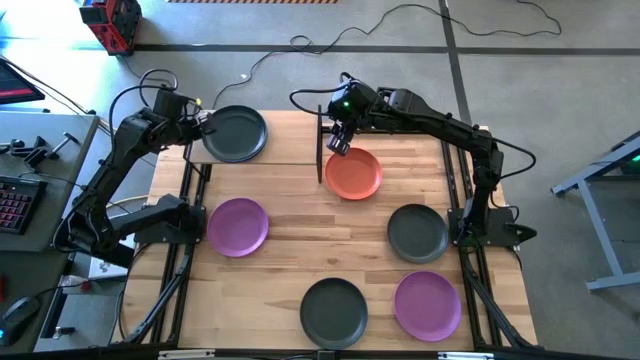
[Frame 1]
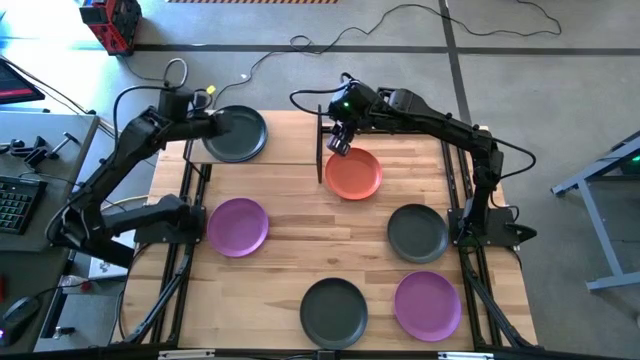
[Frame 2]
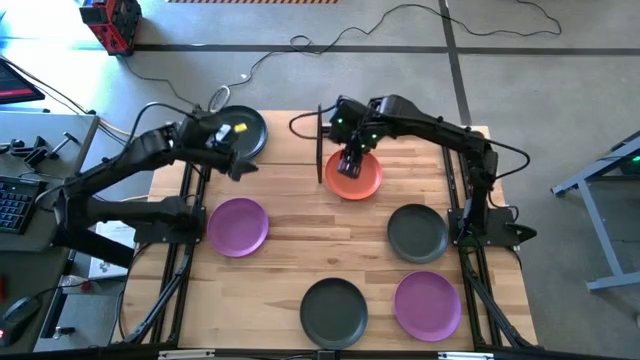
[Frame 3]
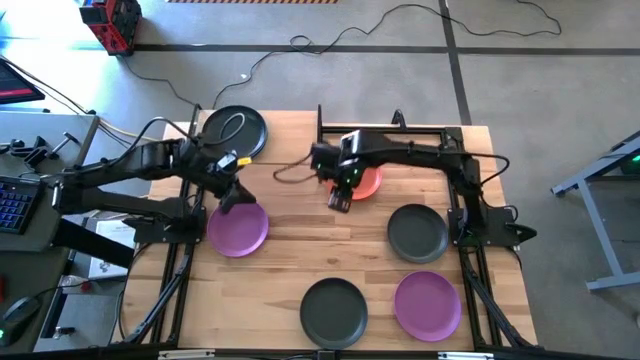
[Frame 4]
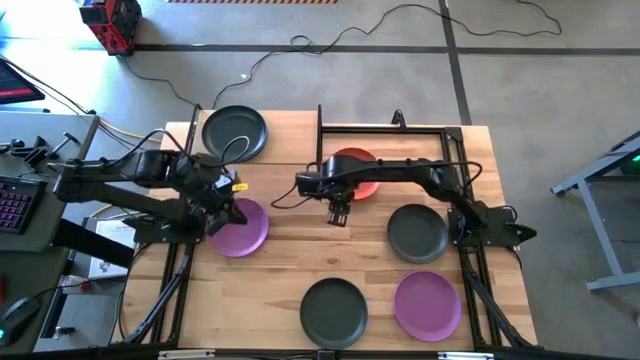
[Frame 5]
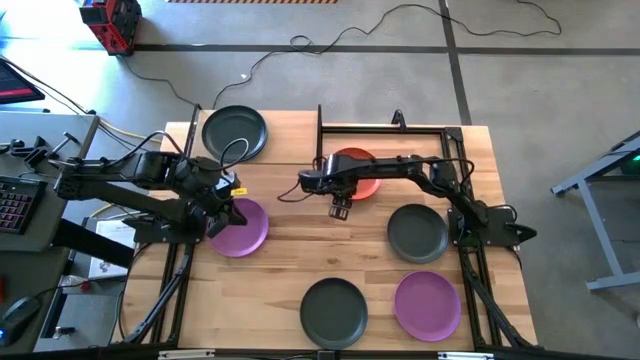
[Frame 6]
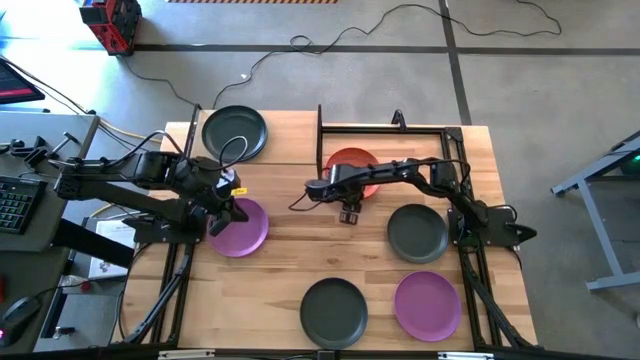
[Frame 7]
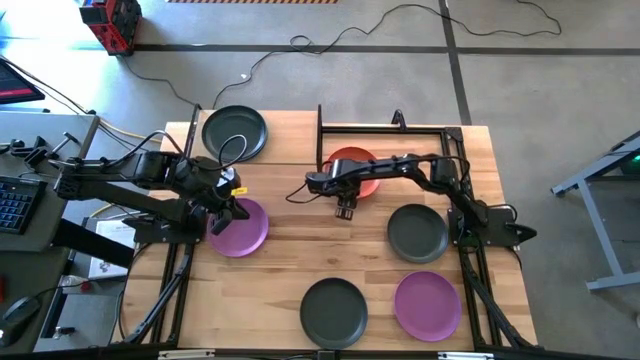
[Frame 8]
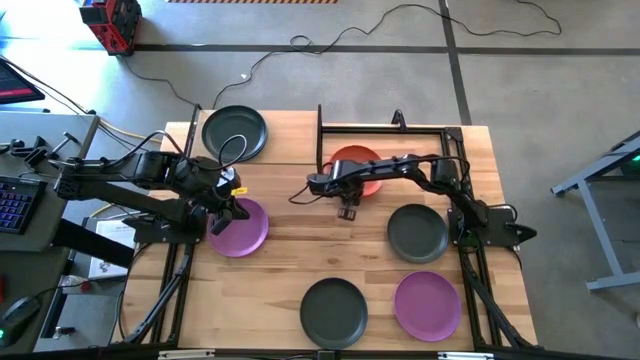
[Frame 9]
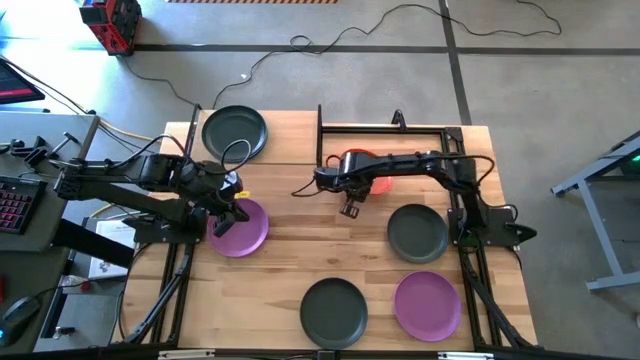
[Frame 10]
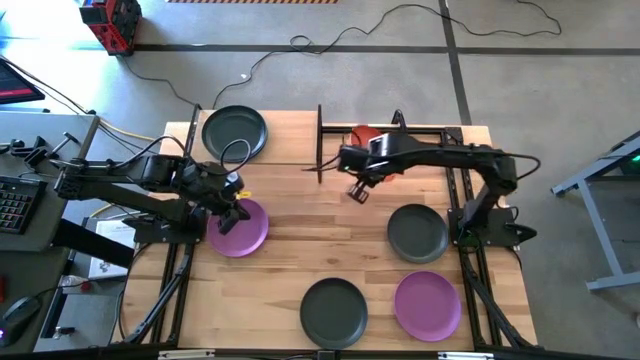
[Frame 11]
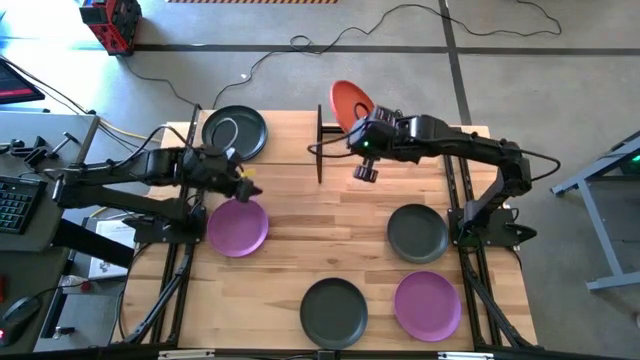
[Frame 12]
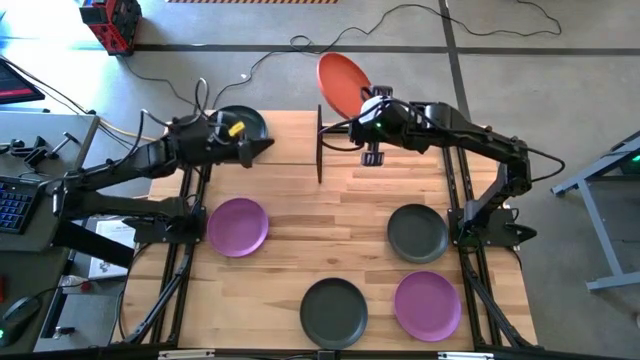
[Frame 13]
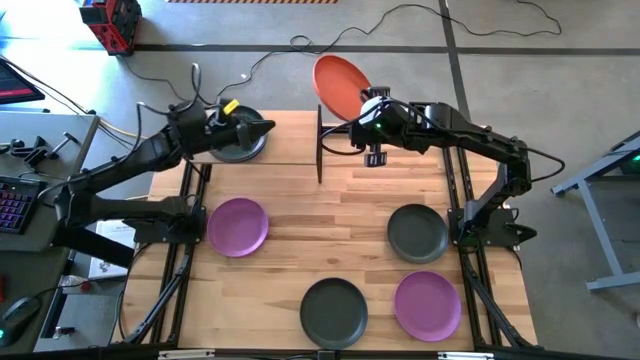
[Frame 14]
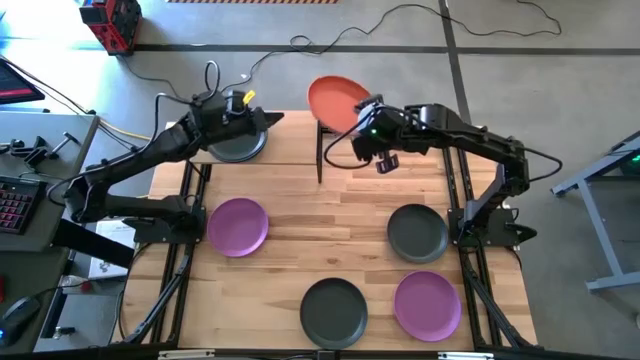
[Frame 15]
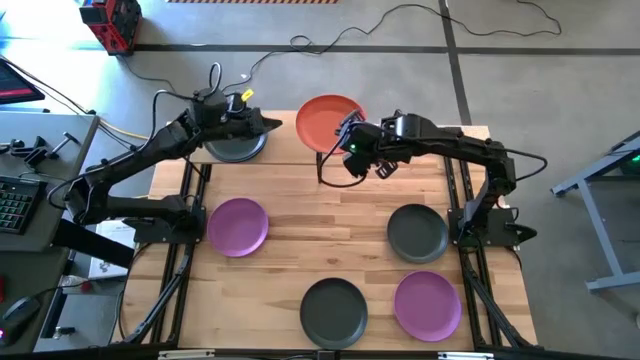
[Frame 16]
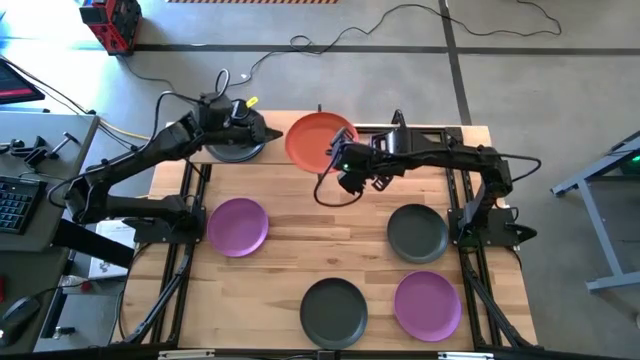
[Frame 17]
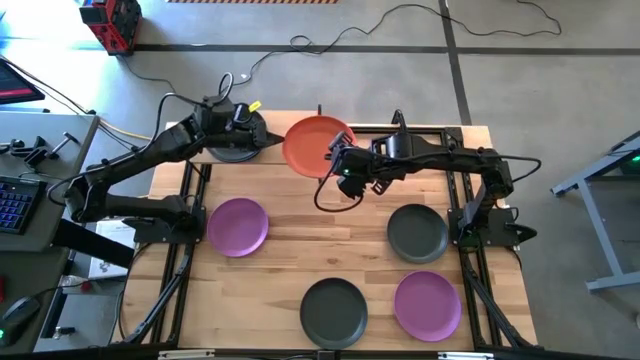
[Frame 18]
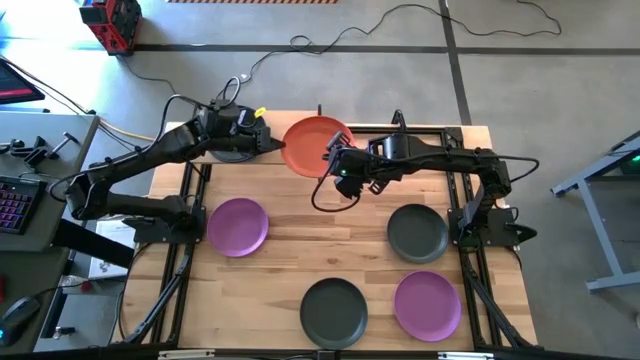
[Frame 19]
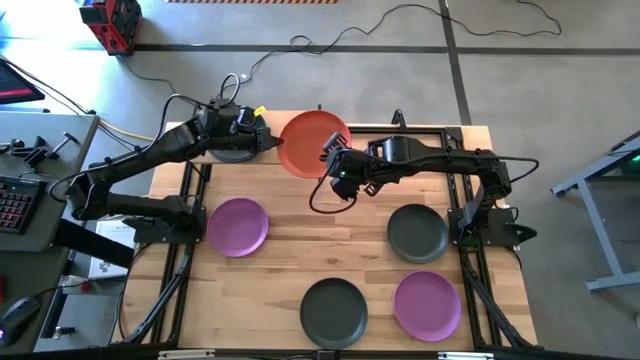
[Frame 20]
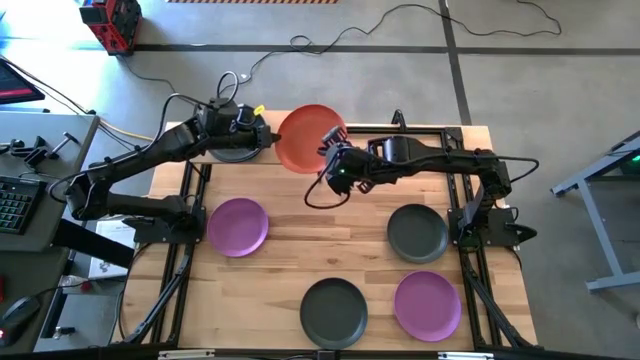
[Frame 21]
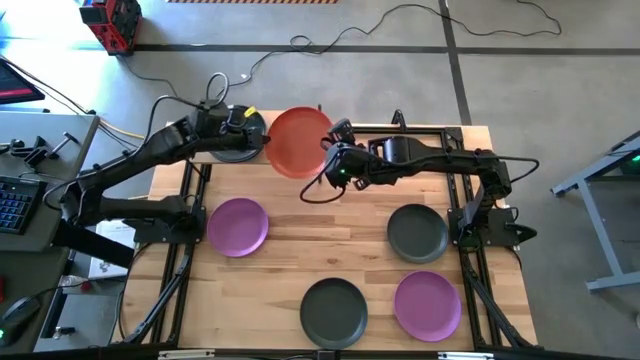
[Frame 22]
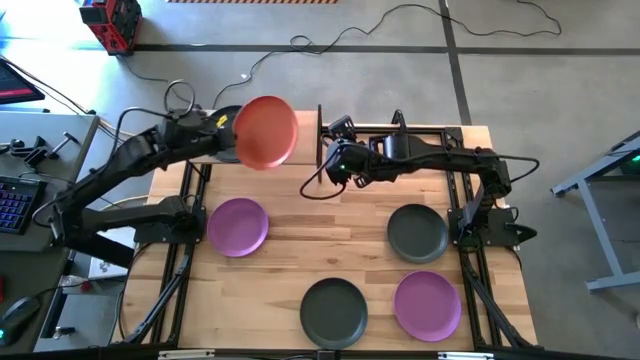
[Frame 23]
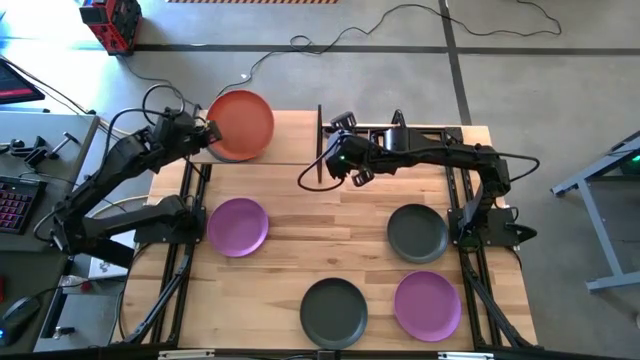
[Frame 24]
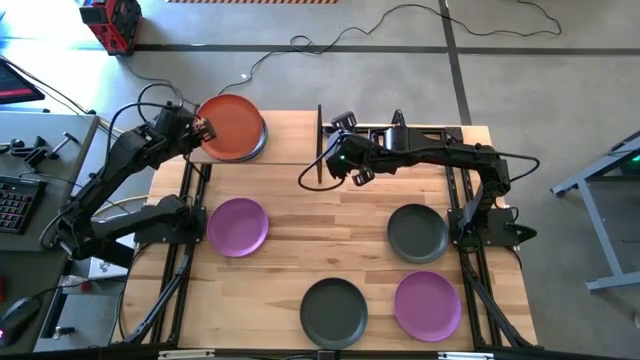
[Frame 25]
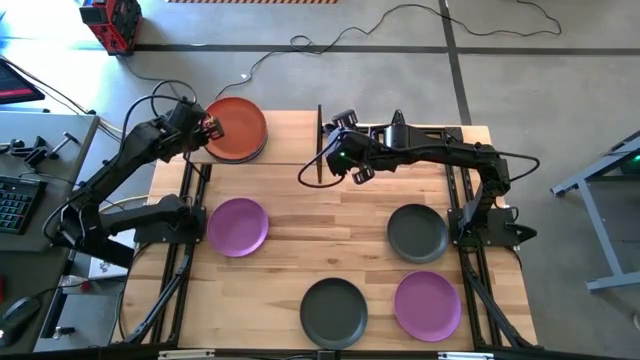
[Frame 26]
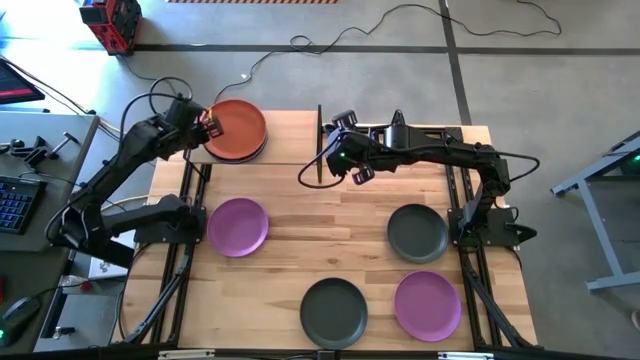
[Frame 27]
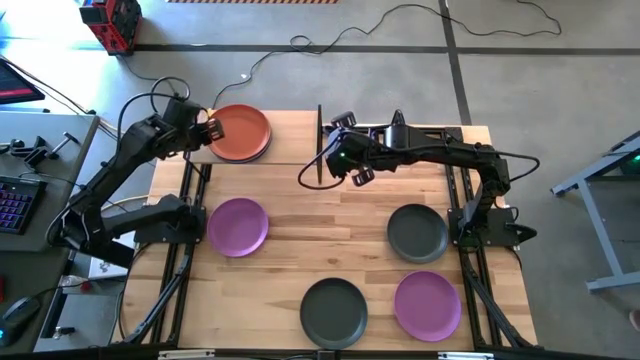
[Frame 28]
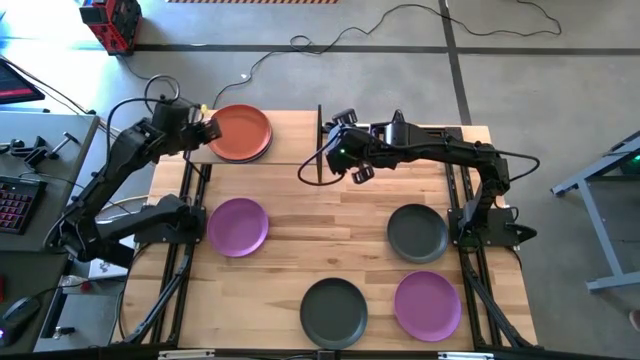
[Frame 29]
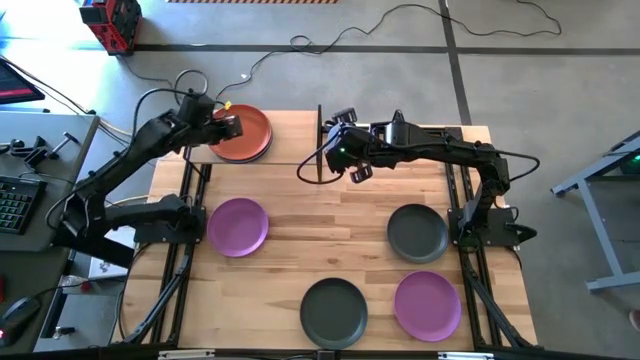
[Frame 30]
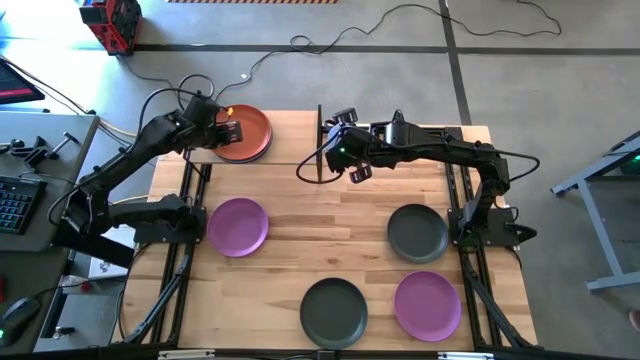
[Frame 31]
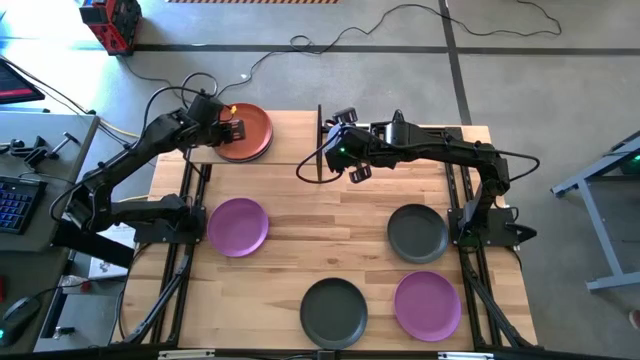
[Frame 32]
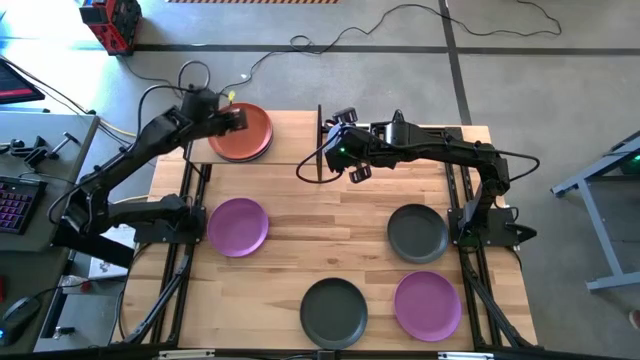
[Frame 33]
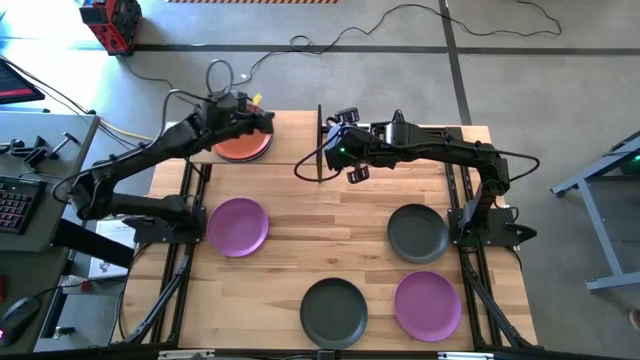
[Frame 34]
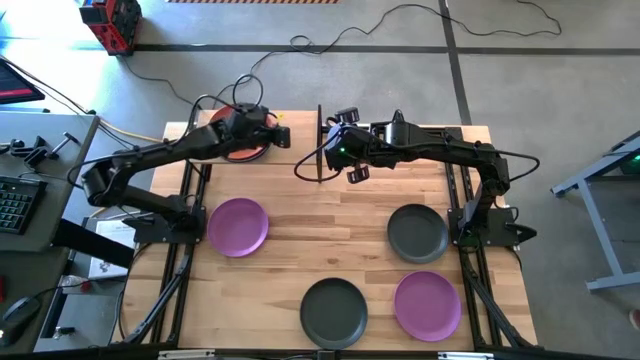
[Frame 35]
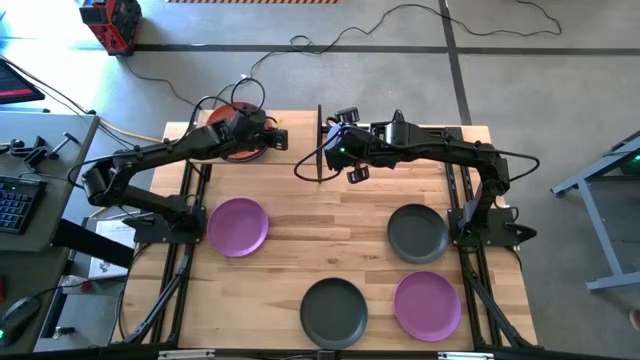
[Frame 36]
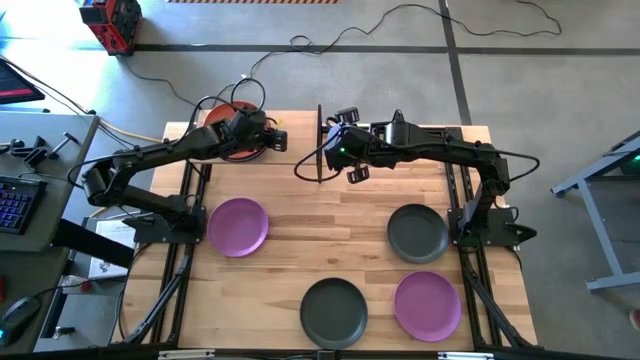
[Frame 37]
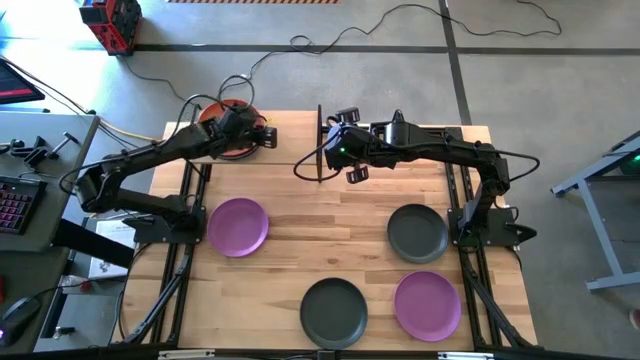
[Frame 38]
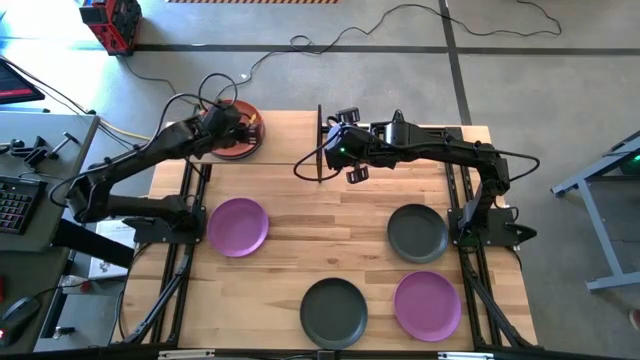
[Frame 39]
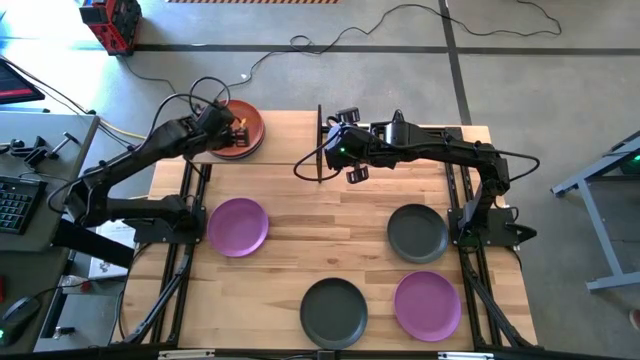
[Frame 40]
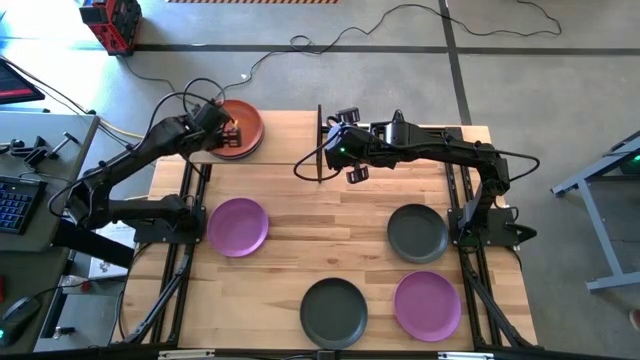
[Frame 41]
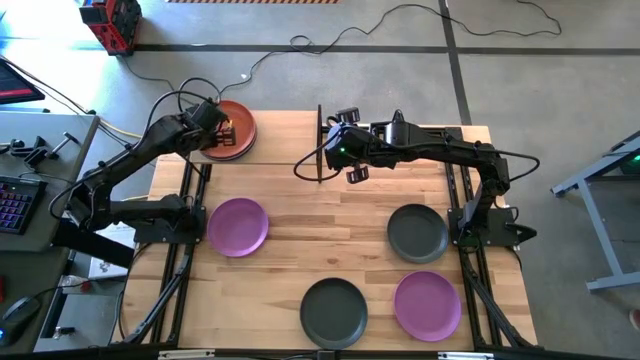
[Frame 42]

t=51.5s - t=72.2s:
Task: Place and stack plates onto a shelf
Stack the orange plate on top of the black plate on the shelf
